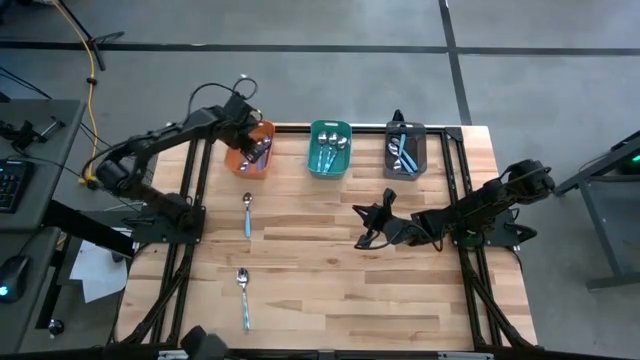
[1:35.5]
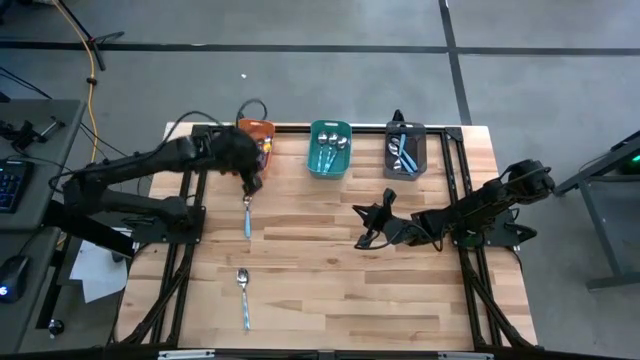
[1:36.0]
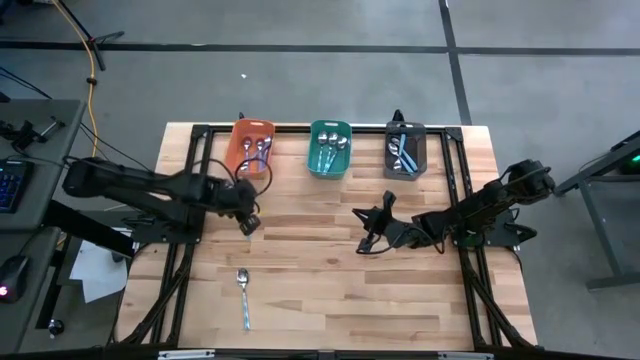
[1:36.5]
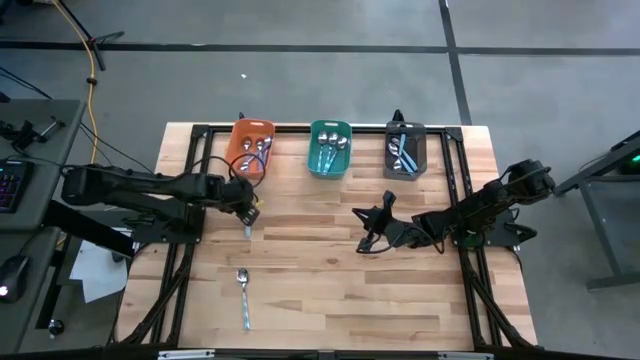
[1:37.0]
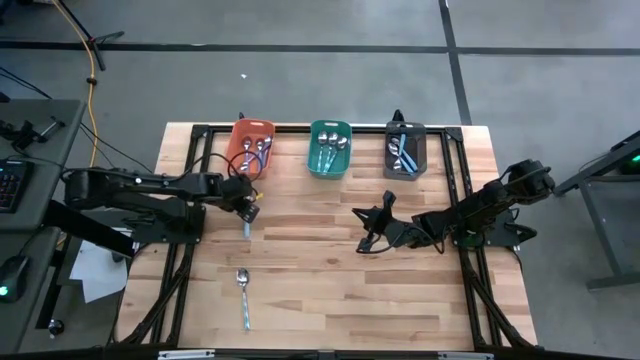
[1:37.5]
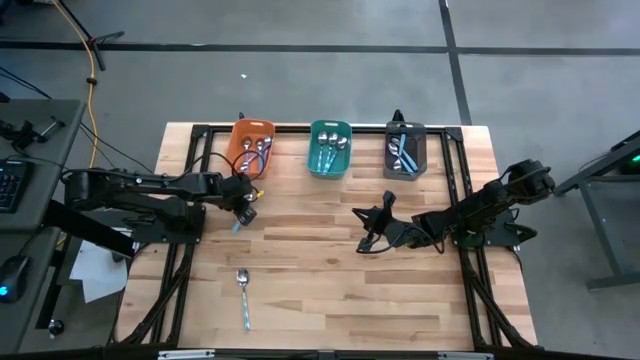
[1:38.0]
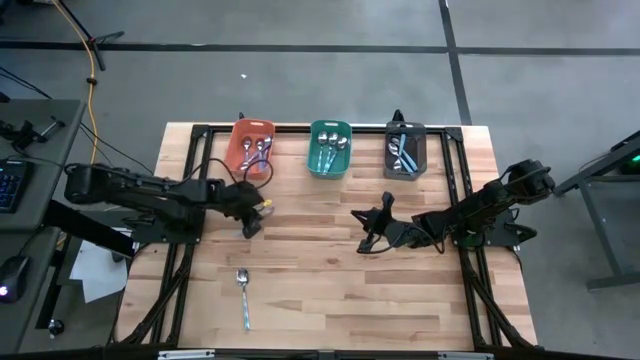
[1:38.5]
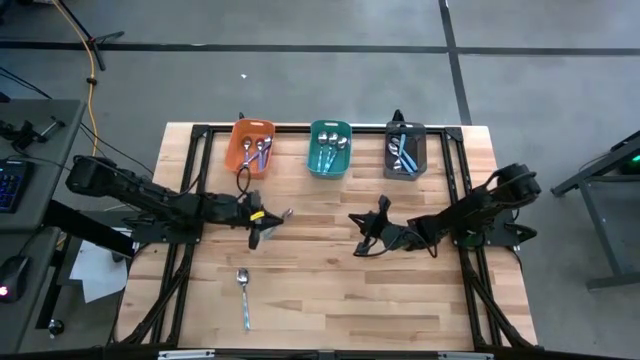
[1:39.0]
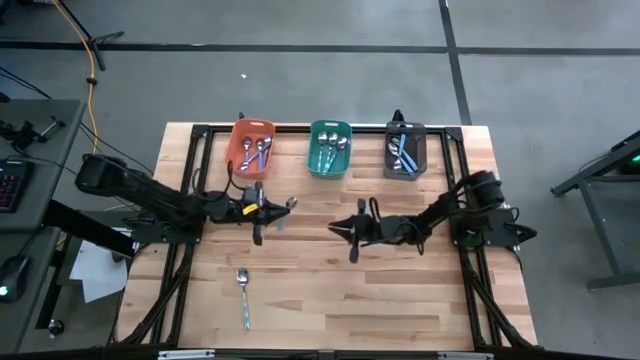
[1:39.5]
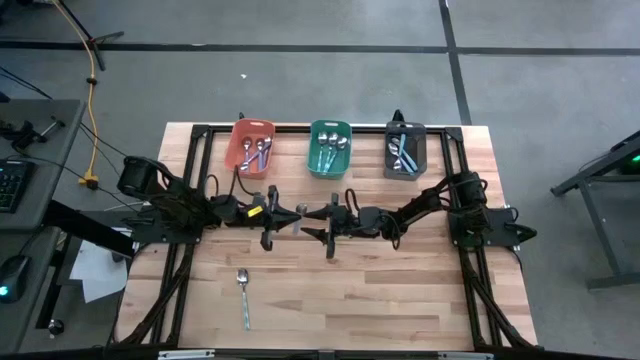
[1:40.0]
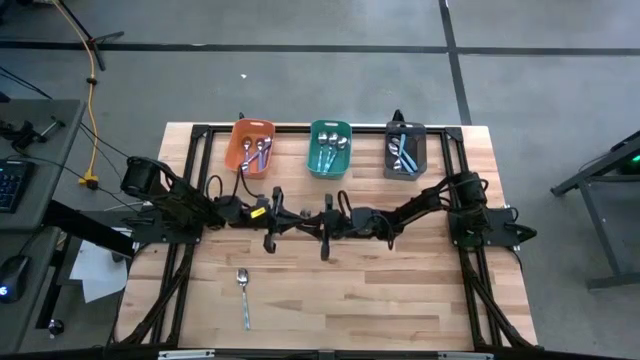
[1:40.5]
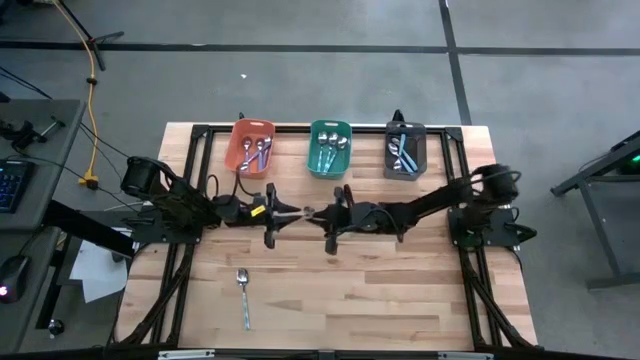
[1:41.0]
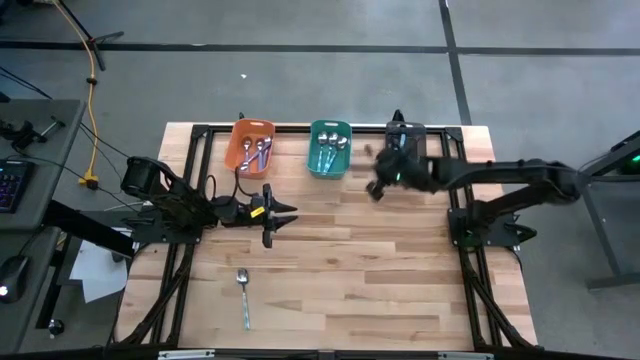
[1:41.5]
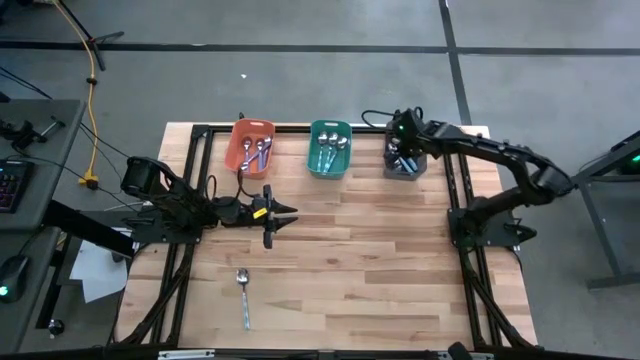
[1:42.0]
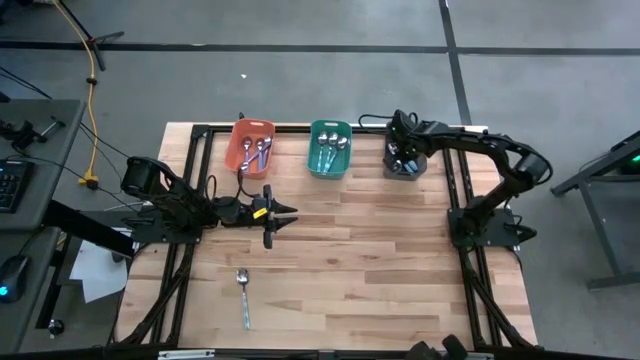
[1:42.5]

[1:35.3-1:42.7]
Task: Sort silverware by color (type)
Put the blue spoon into the black bin

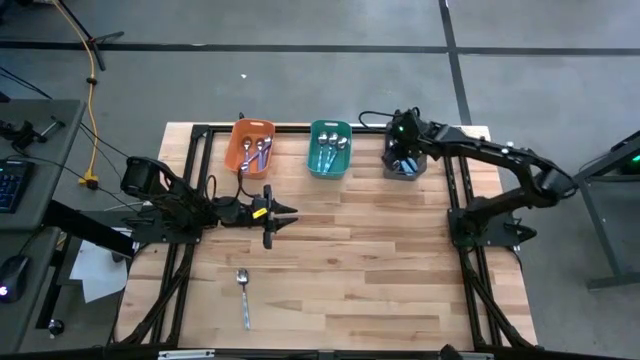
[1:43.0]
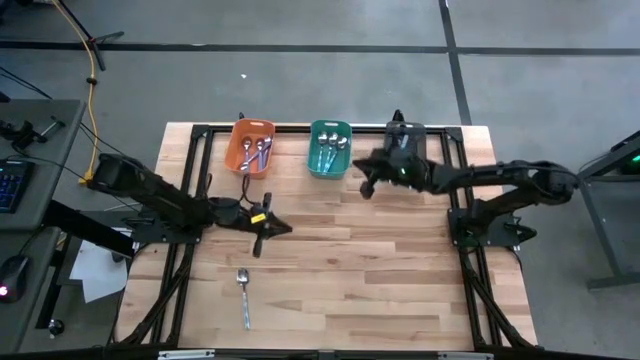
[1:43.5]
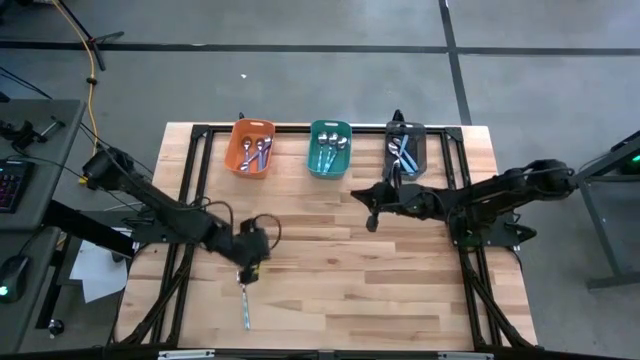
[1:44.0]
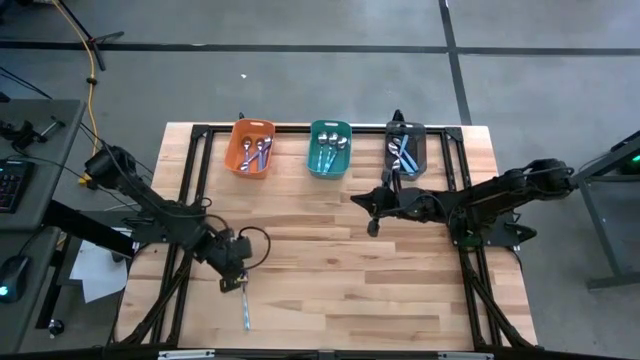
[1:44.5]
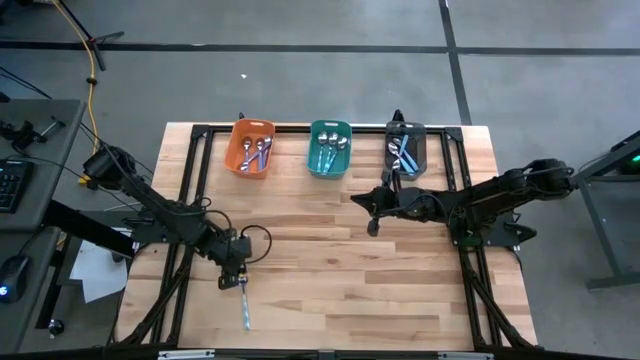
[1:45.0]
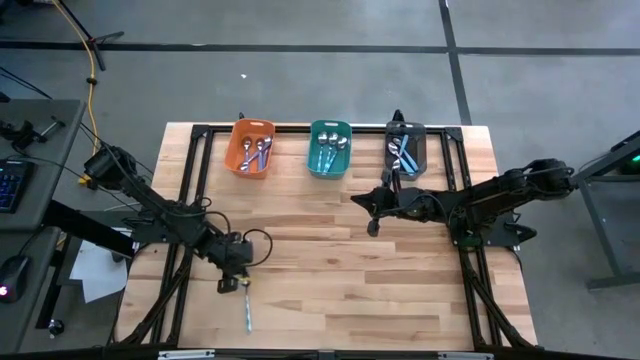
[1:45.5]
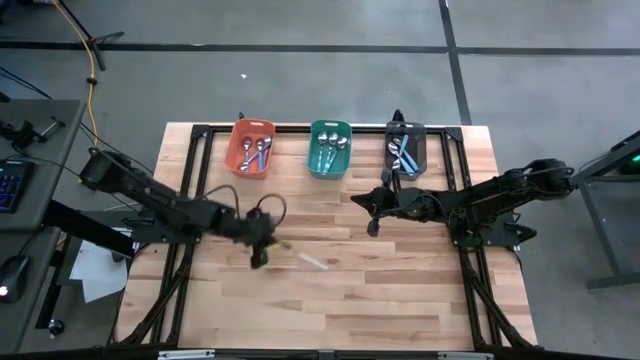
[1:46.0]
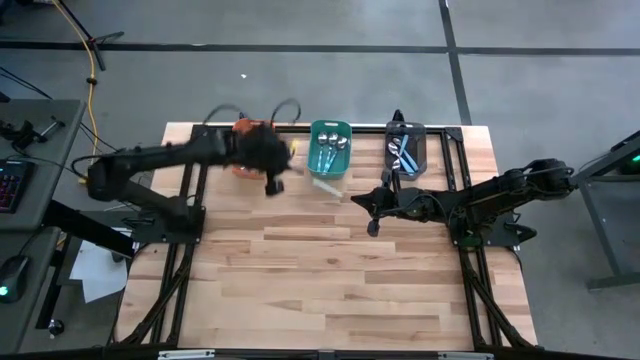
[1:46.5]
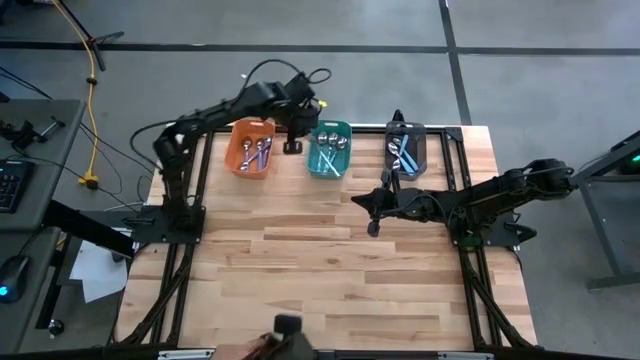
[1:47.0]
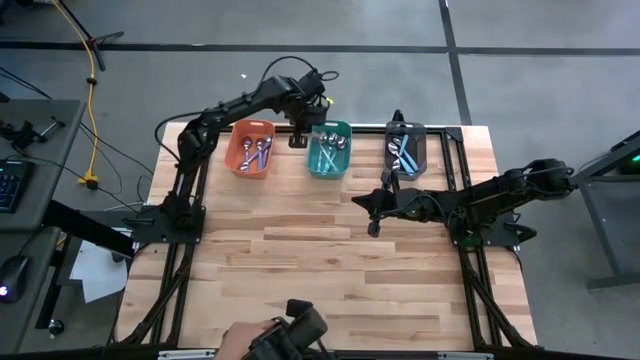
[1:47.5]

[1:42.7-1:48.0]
Put the blue patterned spoon into the green bin

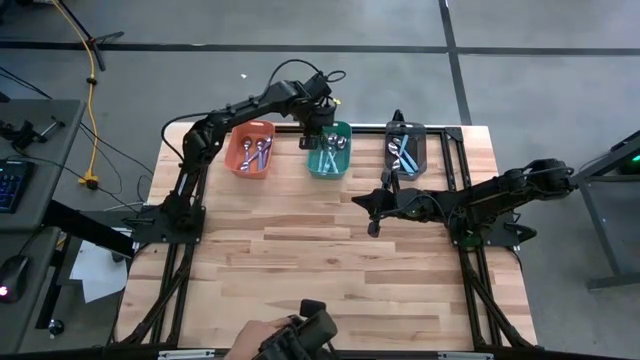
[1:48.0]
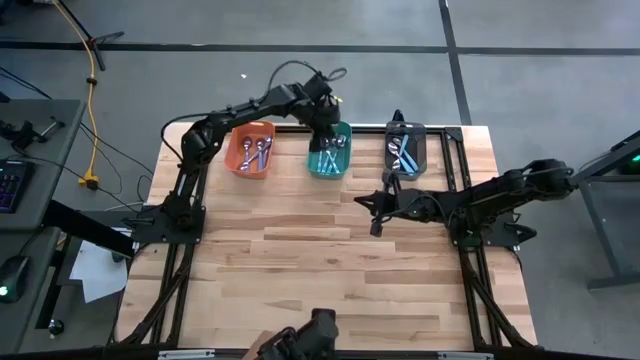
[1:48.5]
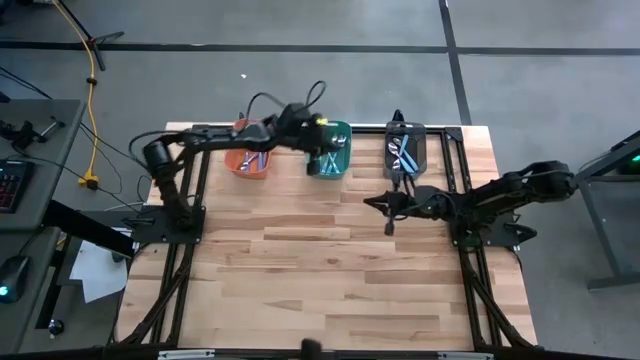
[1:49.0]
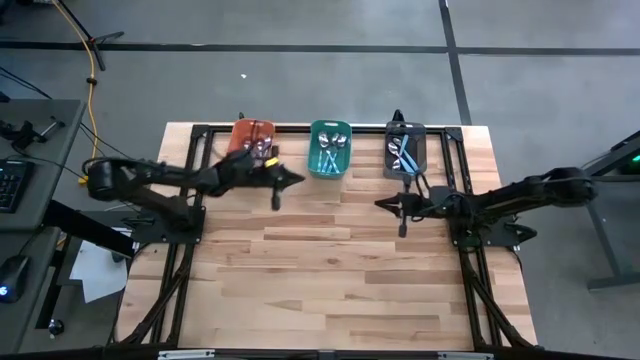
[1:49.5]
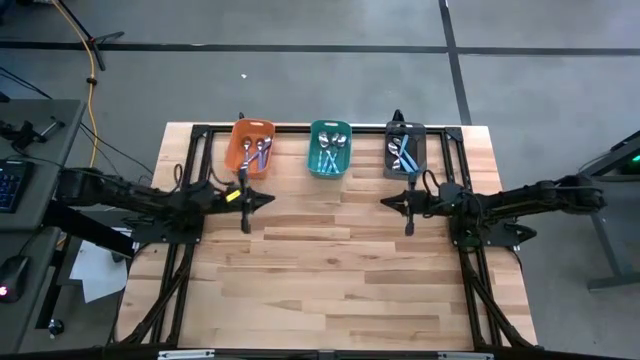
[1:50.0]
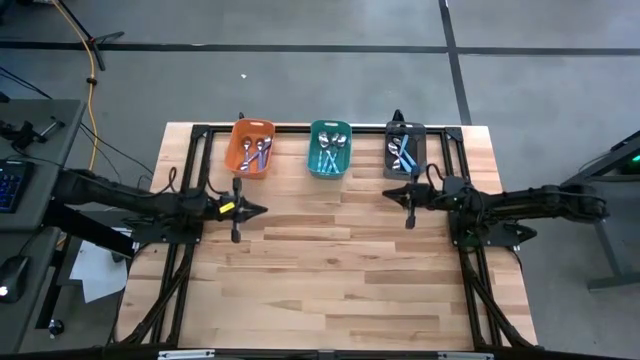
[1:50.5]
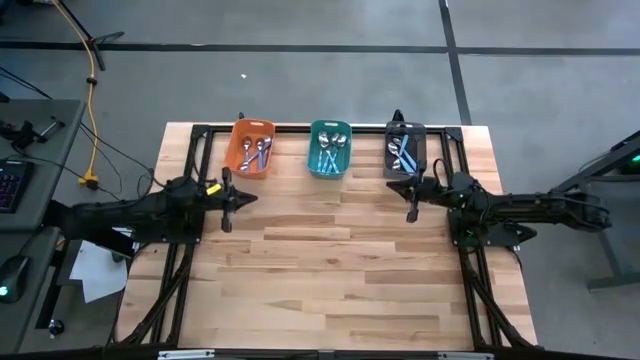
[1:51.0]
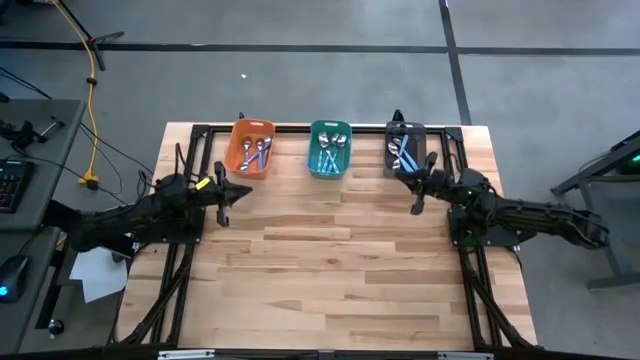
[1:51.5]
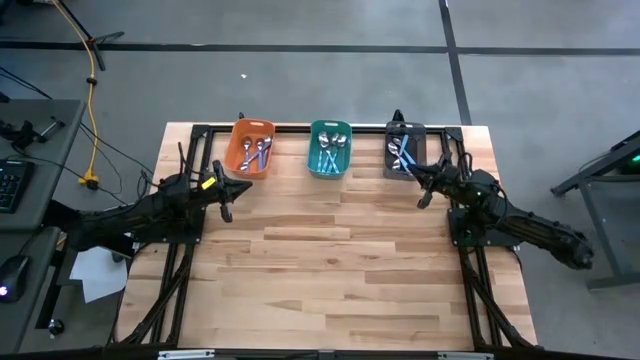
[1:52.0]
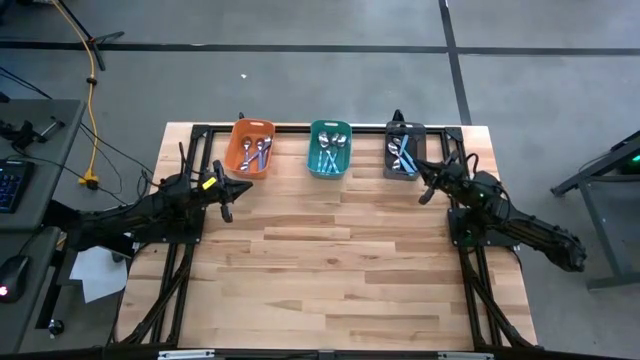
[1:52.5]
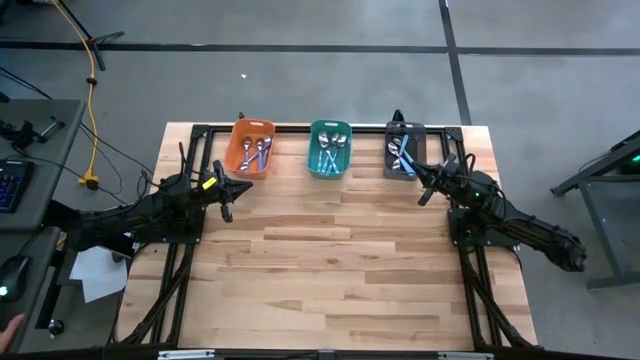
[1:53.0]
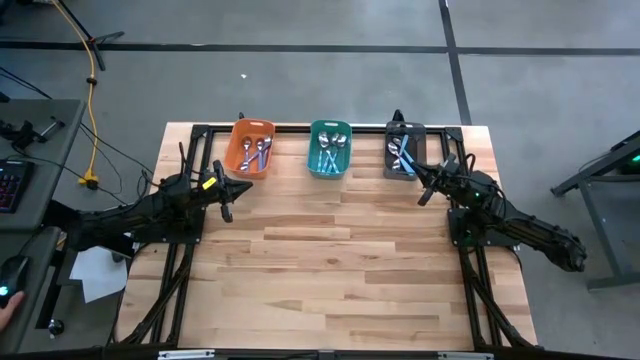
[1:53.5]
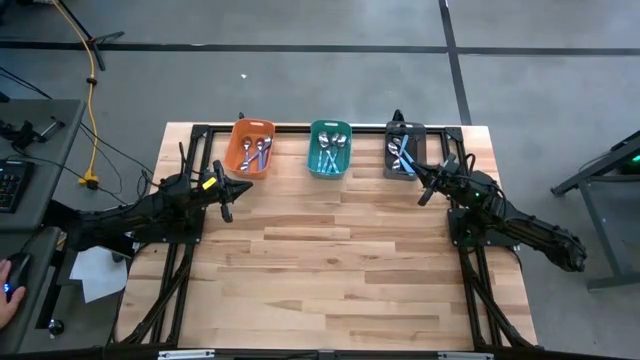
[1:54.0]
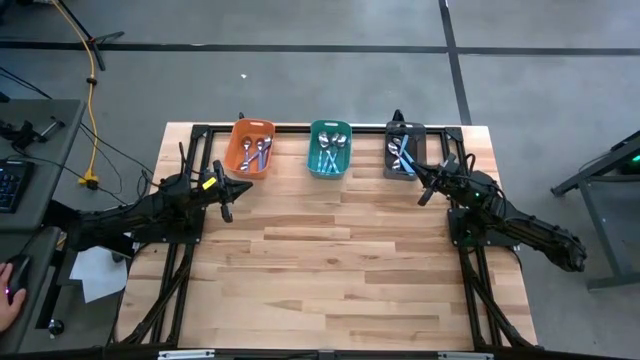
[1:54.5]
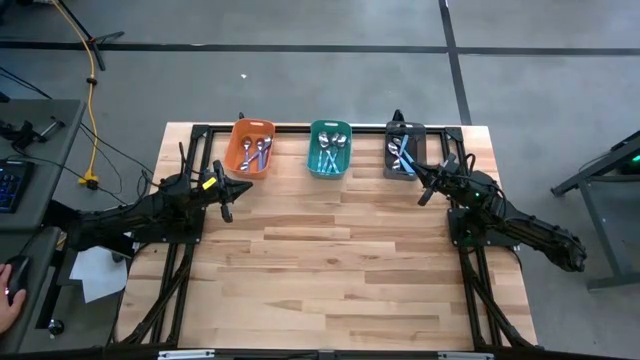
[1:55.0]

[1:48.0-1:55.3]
Return to Home Position

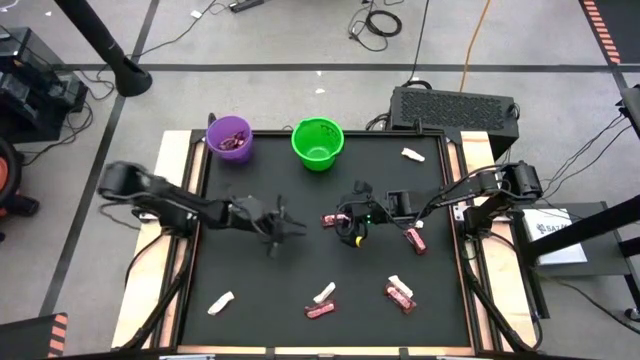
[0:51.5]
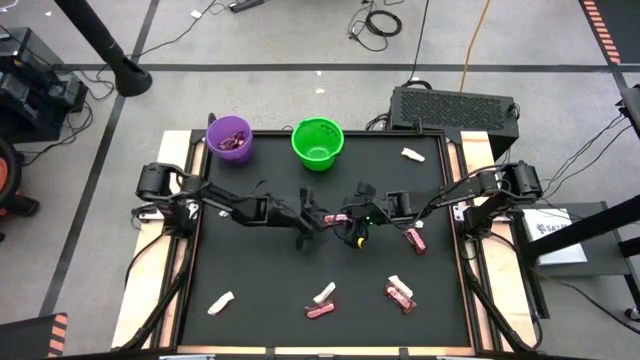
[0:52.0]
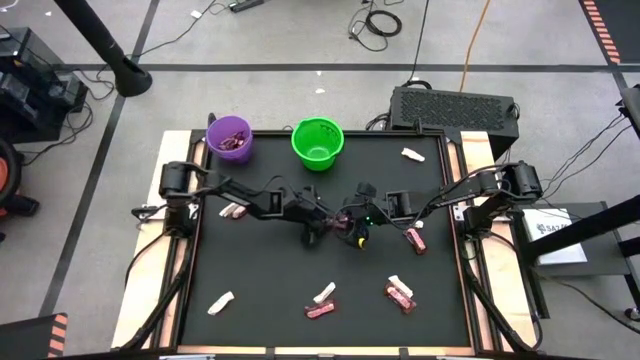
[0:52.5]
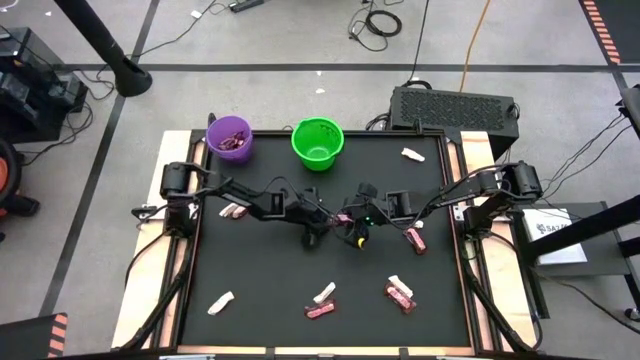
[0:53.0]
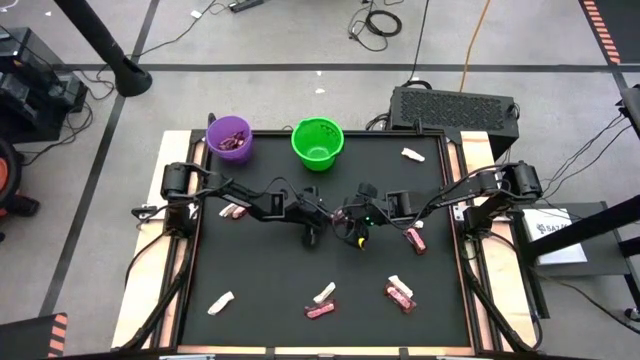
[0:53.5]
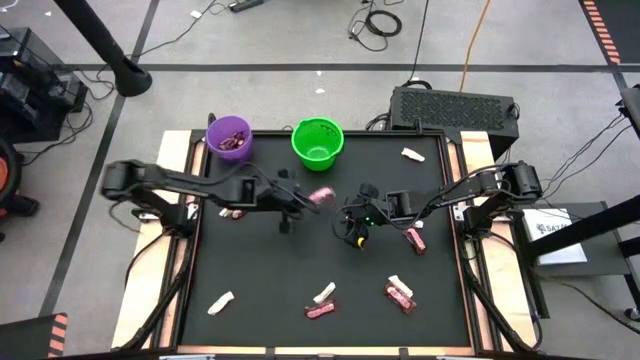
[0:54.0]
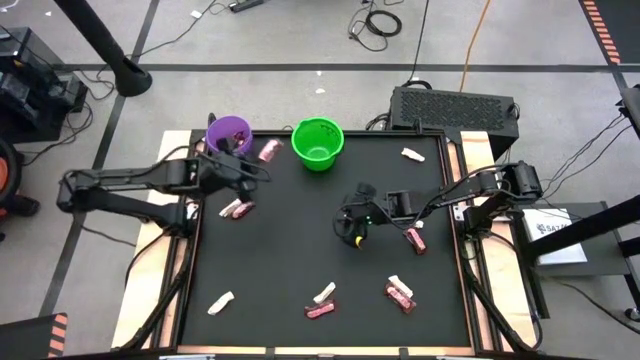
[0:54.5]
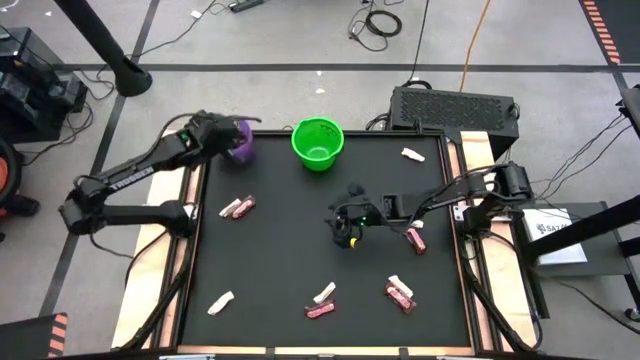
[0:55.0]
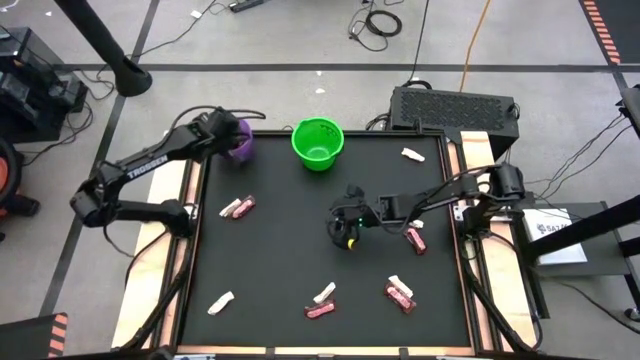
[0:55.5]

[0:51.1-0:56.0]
Task: Sort candy by brand, put in halloween buckets
Put the brown chocolate bar into the purple bucket
